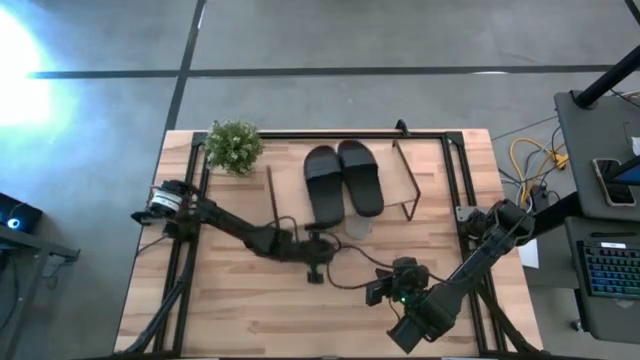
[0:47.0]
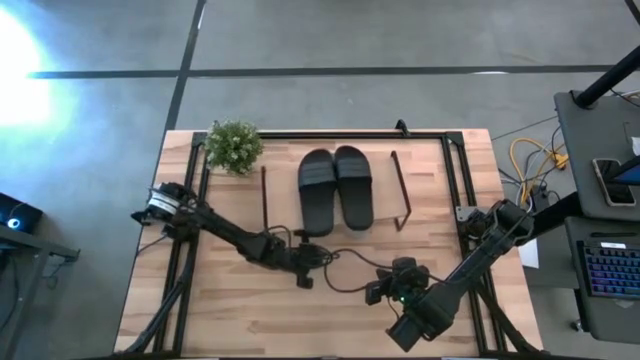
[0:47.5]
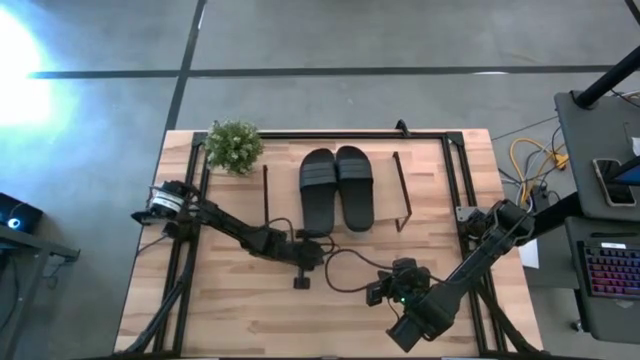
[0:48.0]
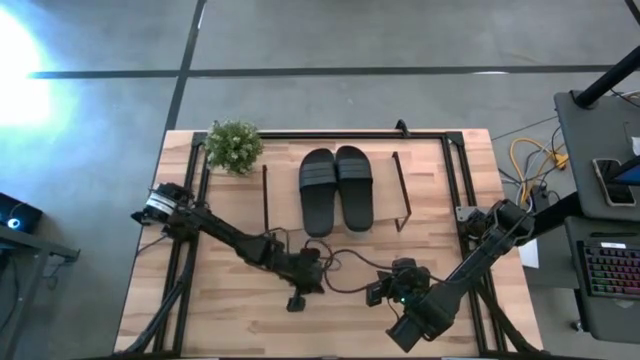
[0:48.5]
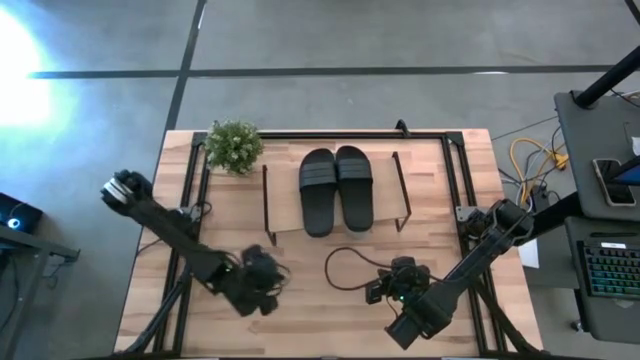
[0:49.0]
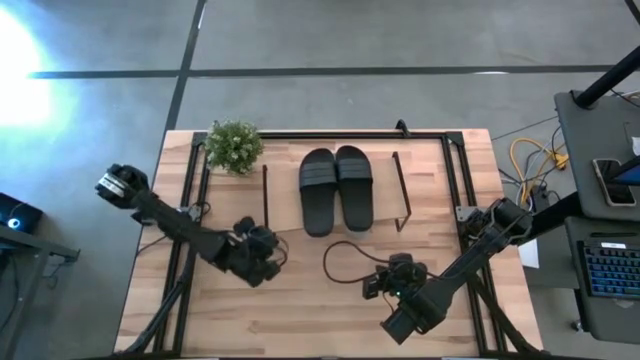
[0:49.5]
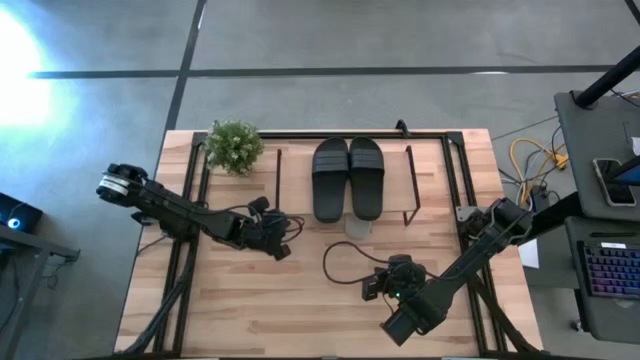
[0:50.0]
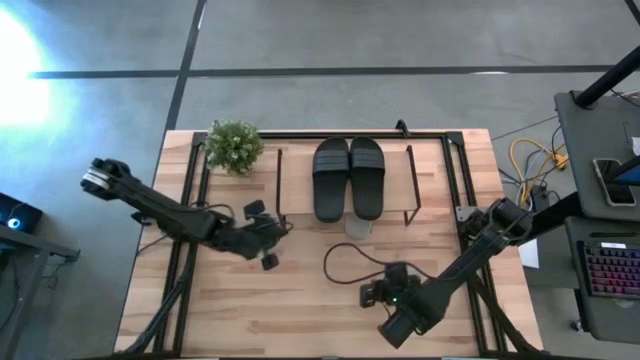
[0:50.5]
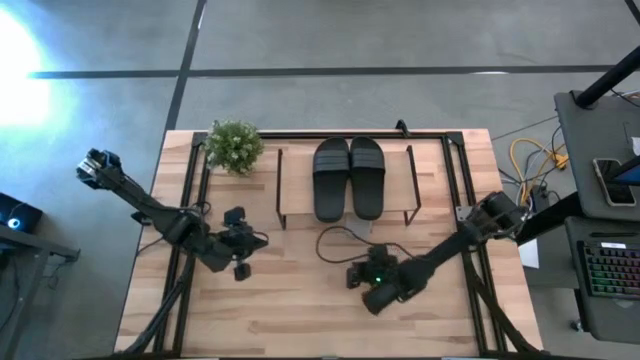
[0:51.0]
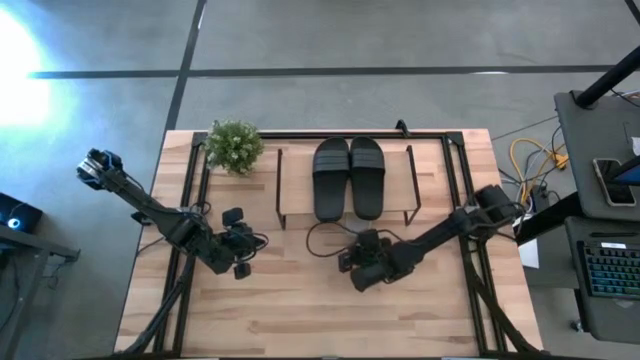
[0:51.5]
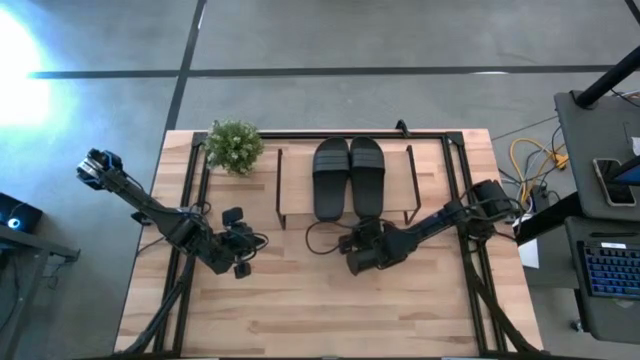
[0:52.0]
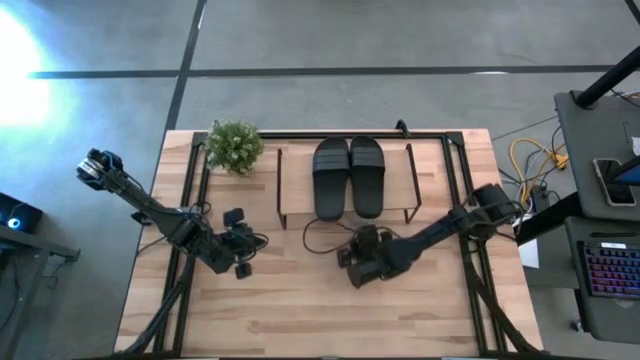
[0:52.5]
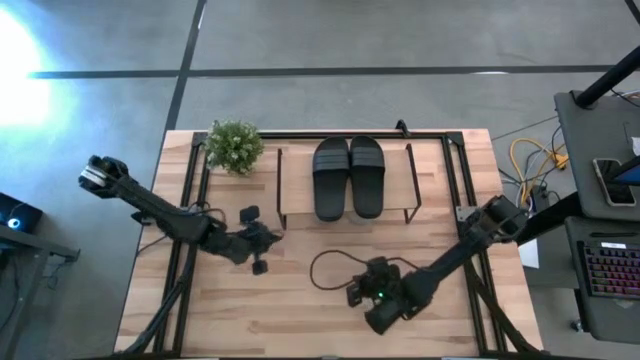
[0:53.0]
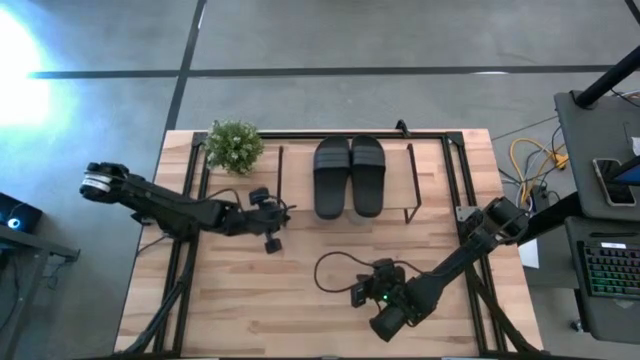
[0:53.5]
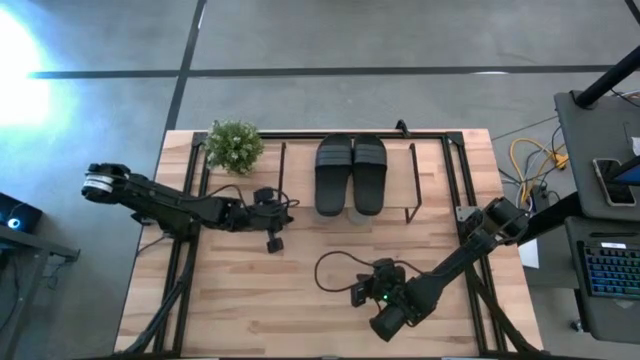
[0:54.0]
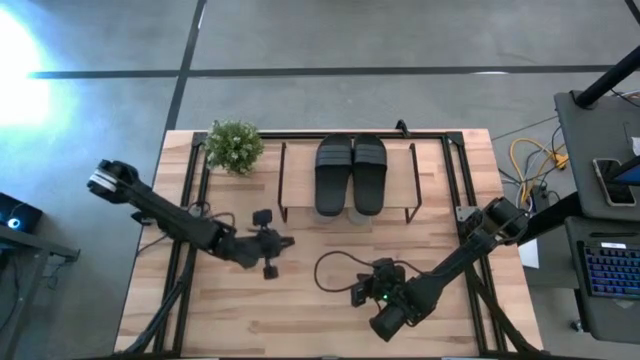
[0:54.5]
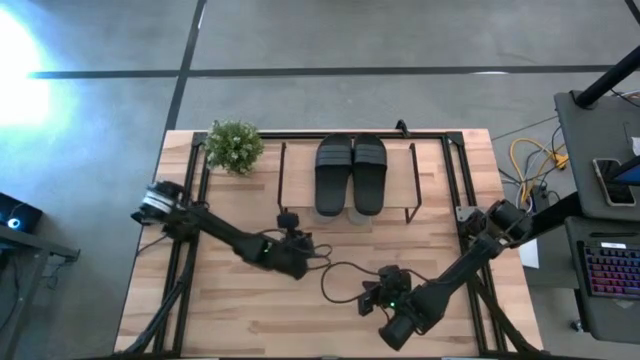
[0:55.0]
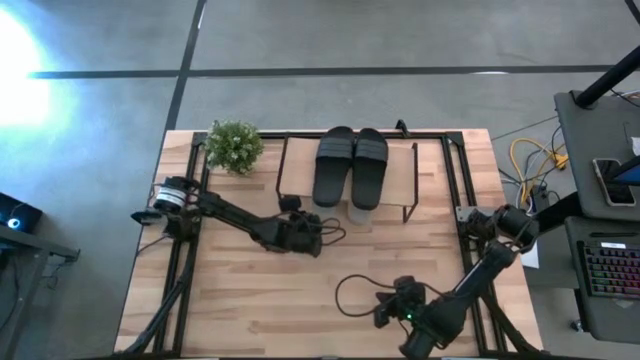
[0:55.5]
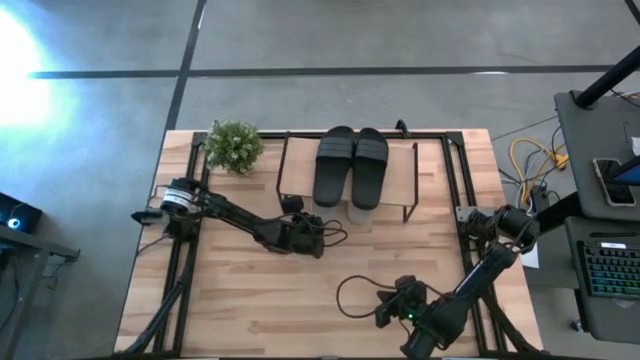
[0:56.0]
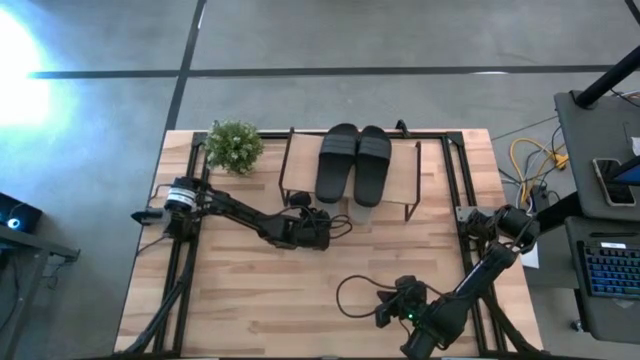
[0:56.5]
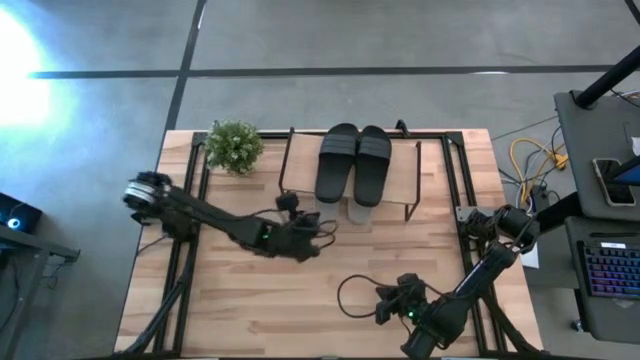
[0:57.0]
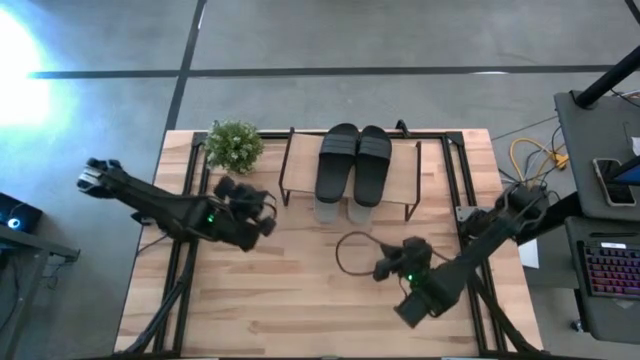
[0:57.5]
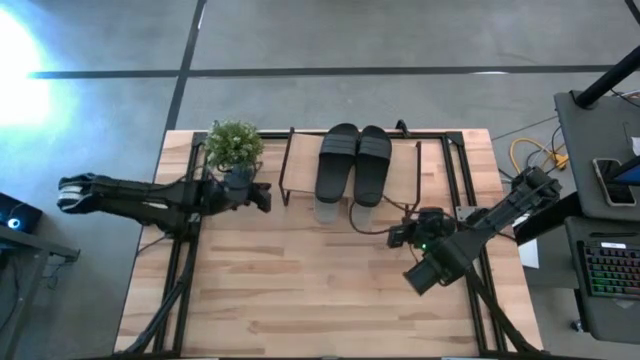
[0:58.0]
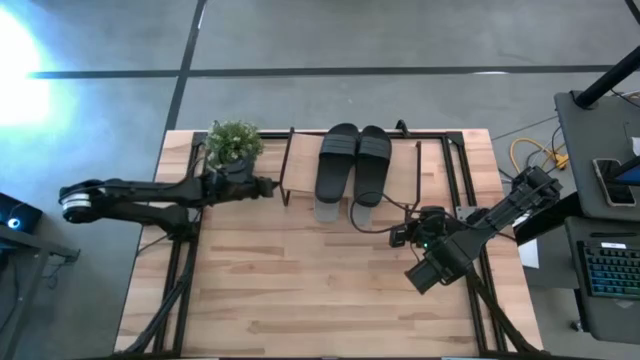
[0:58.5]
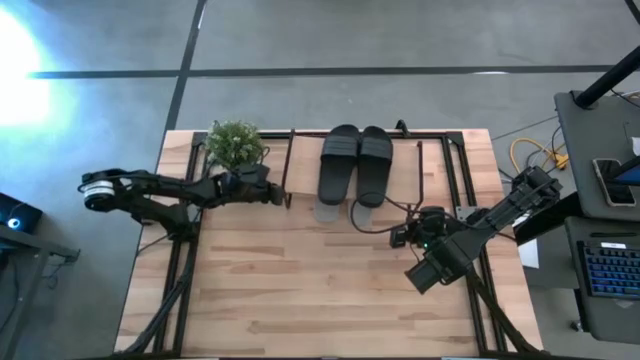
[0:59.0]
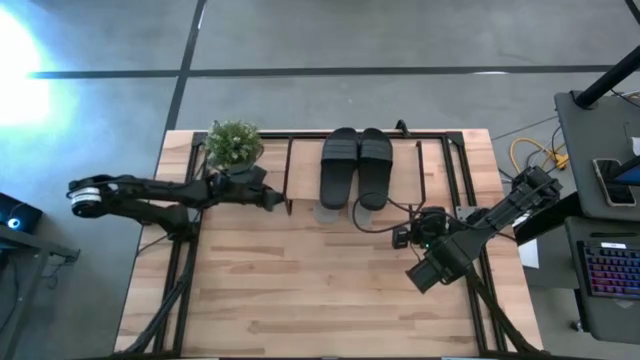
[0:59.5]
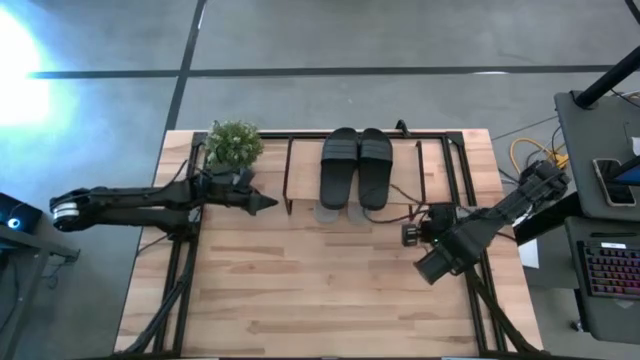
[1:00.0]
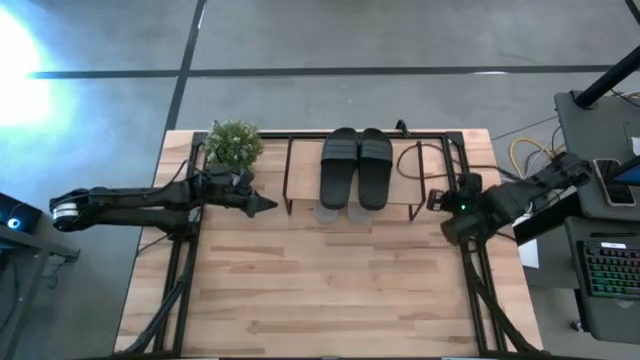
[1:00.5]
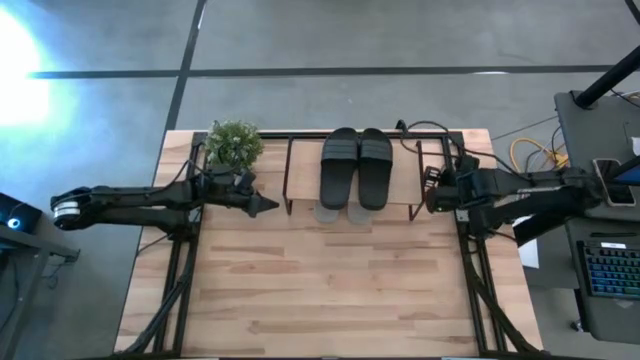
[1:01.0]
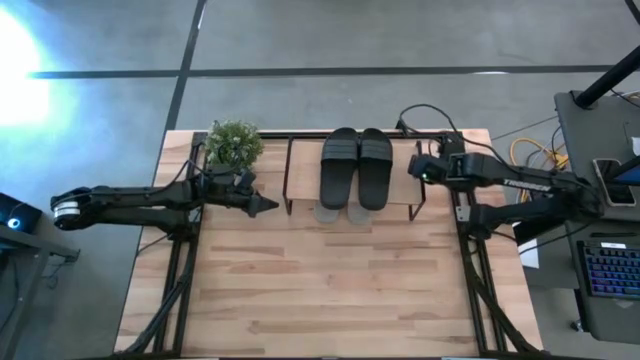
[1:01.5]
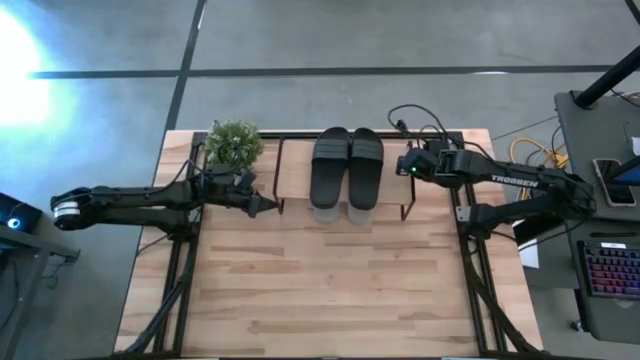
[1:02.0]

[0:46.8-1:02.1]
Task: Pick and place slides into the shelf
Adjust the shelf

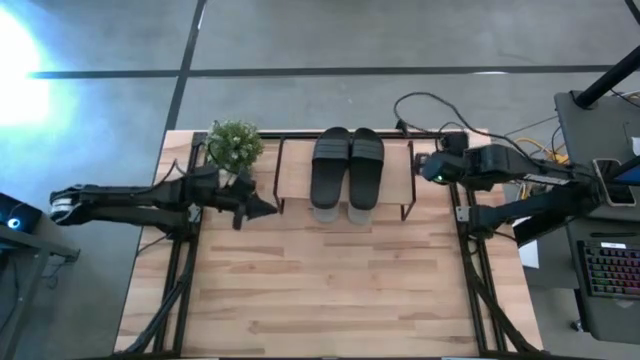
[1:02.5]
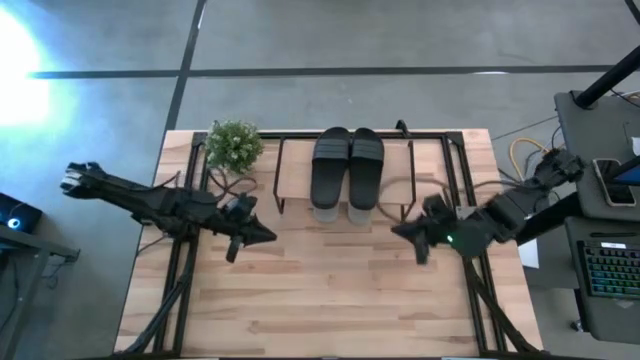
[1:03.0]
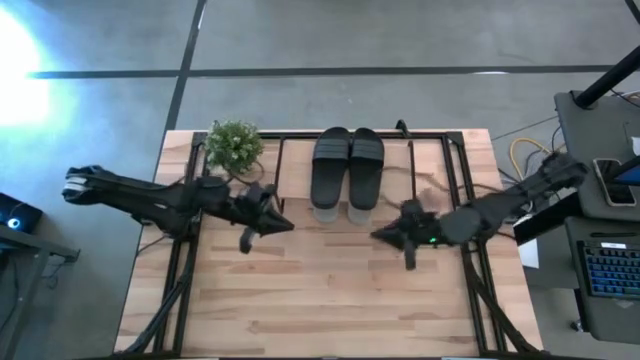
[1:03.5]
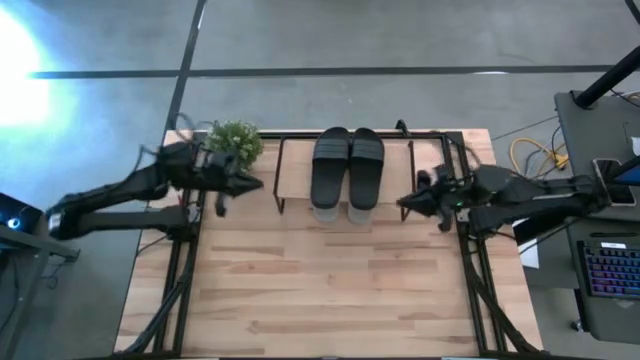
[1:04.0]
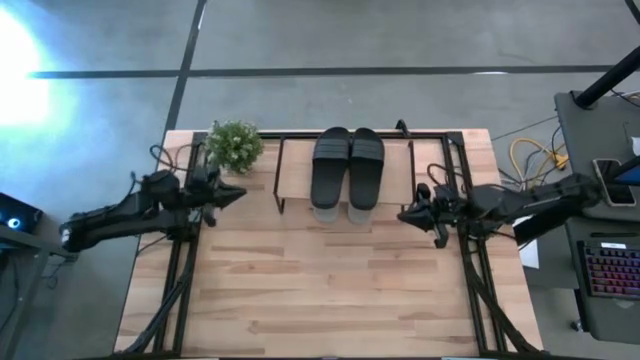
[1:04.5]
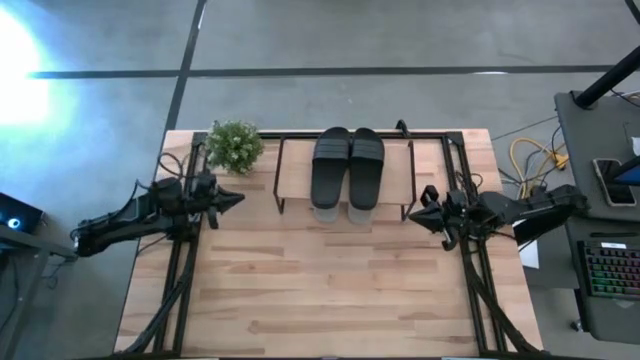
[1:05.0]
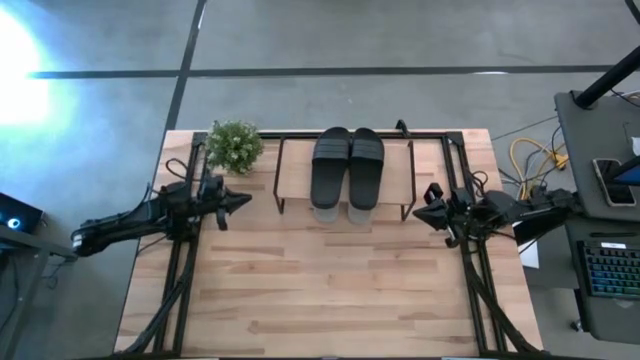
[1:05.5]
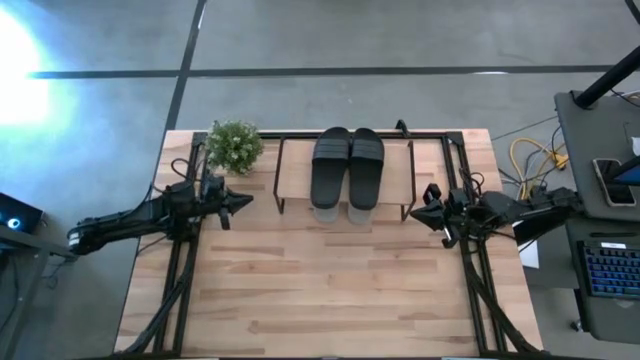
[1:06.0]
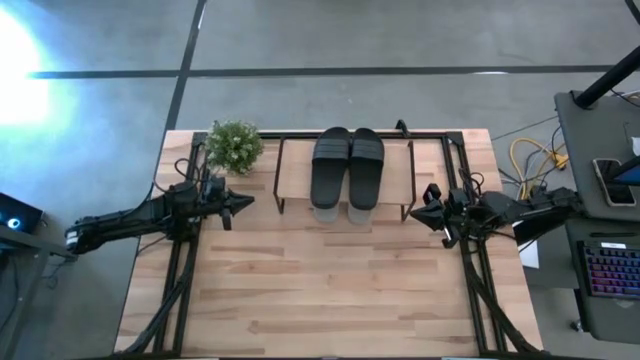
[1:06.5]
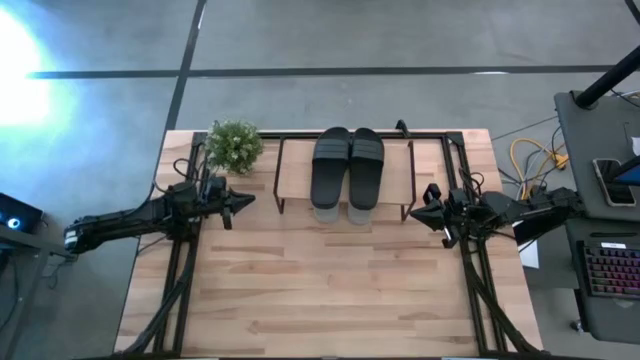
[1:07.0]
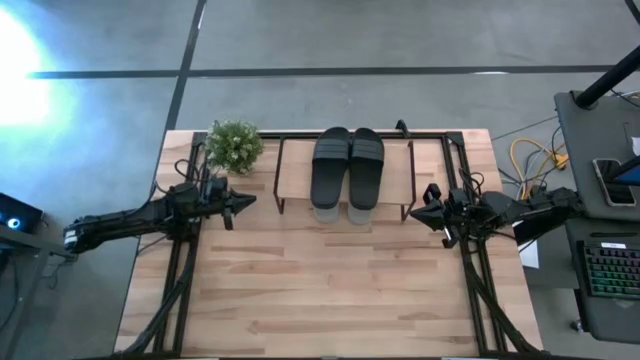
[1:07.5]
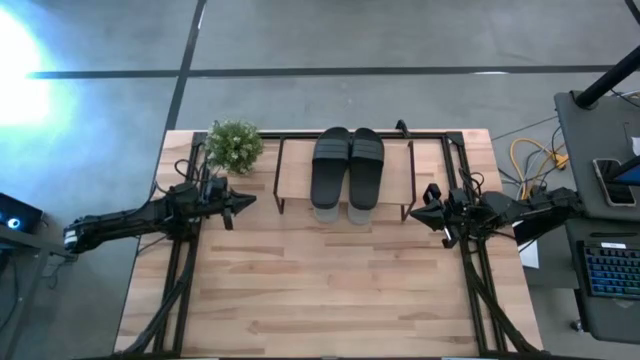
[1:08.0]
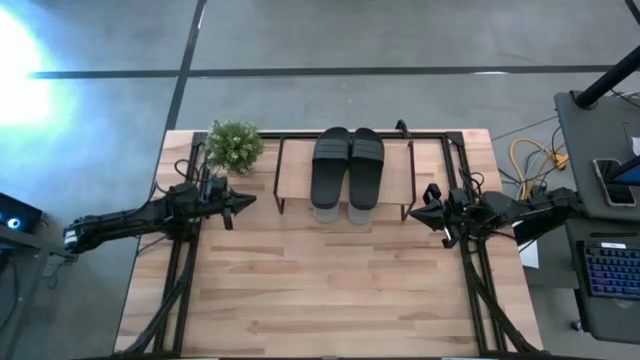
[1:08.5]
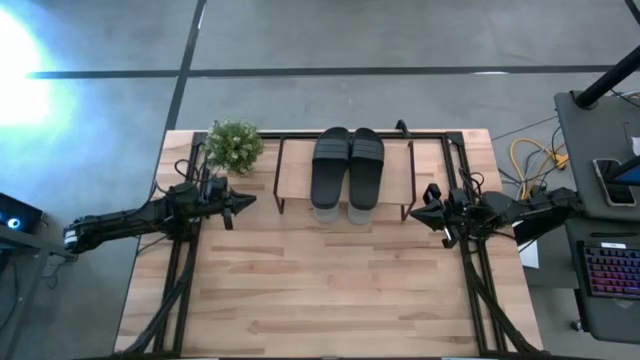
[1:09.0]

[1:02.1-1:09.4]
Return to Home Position
